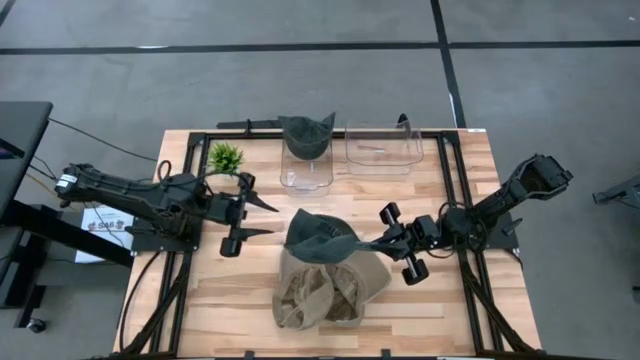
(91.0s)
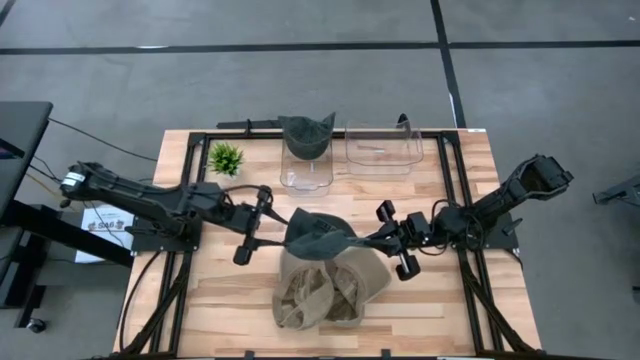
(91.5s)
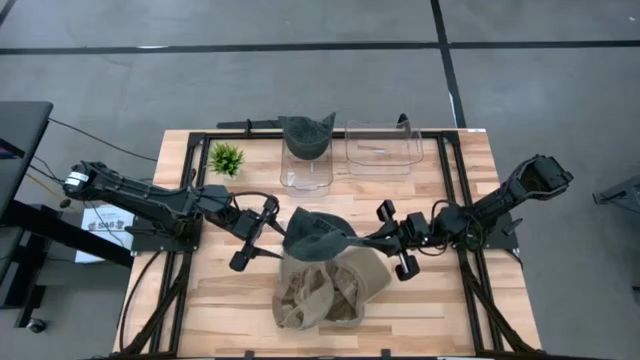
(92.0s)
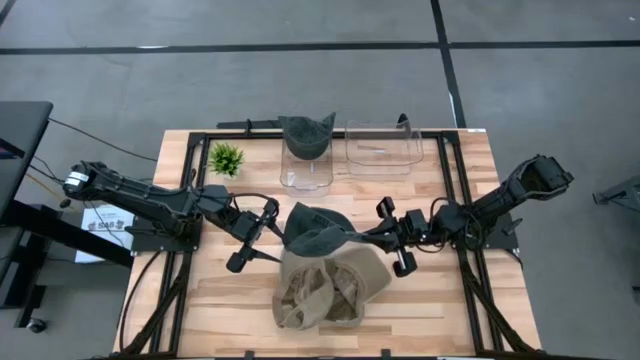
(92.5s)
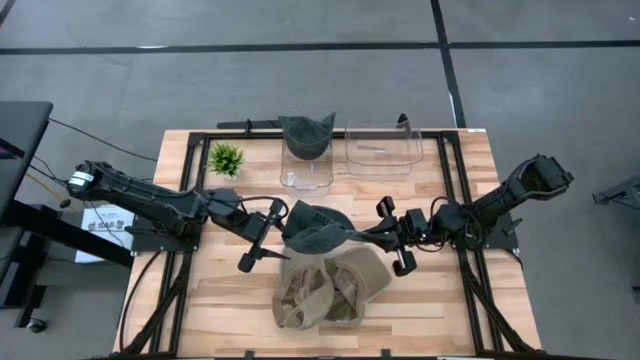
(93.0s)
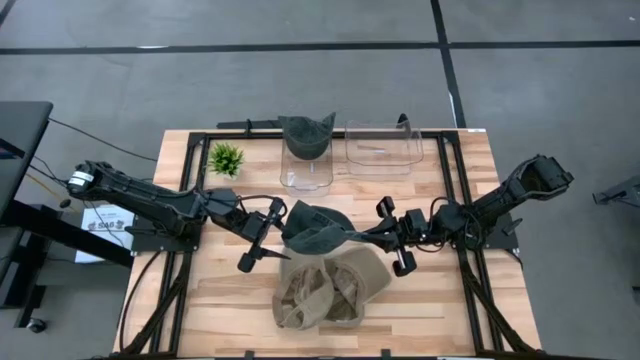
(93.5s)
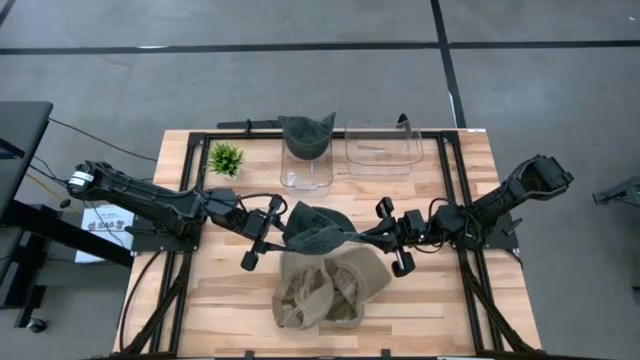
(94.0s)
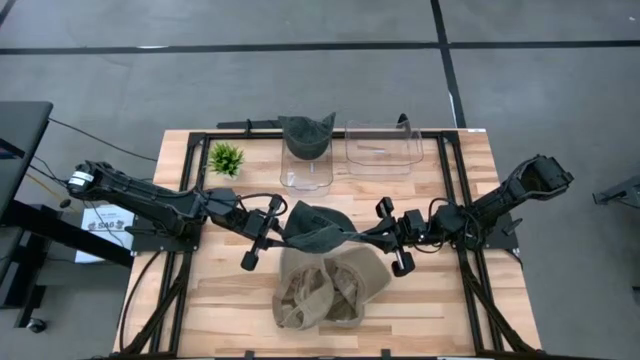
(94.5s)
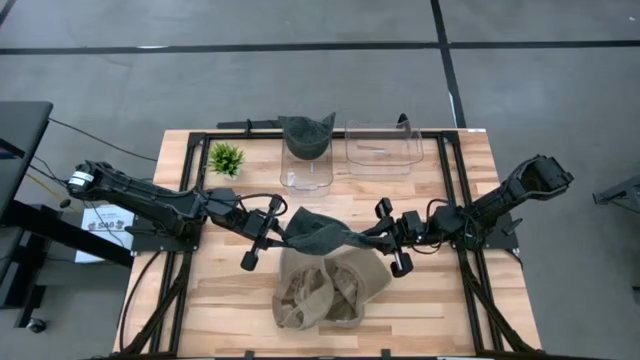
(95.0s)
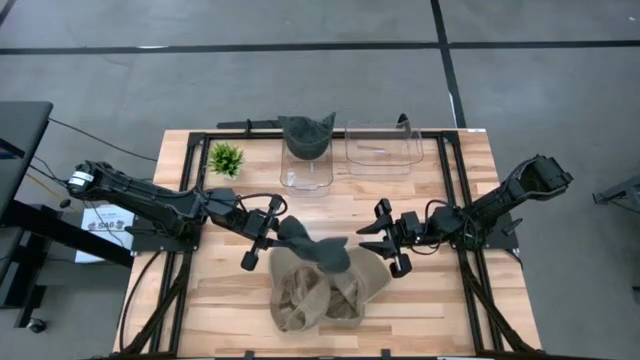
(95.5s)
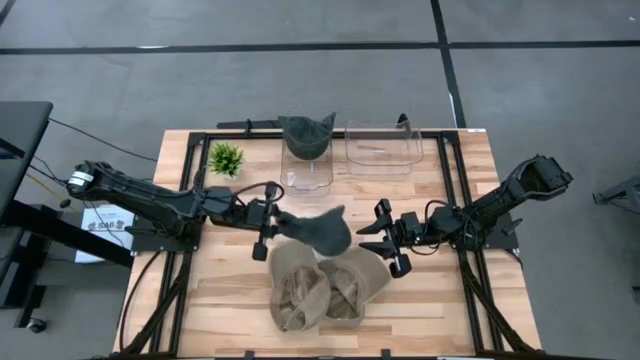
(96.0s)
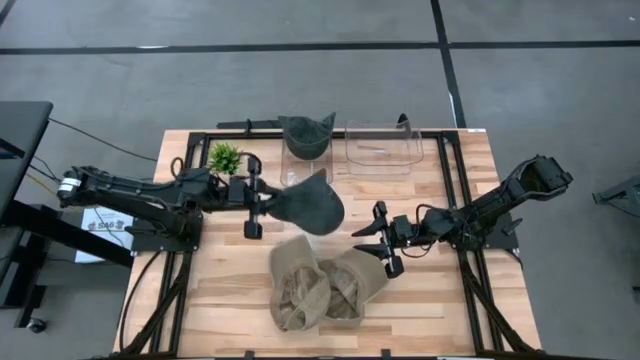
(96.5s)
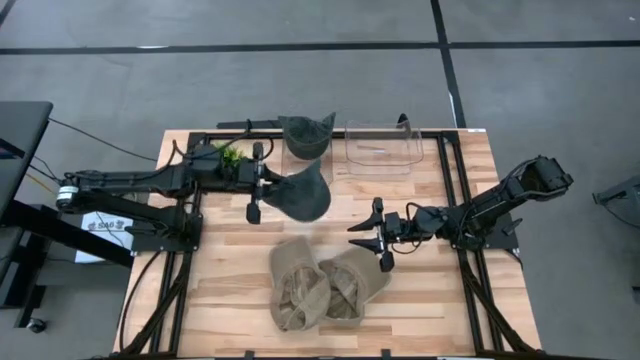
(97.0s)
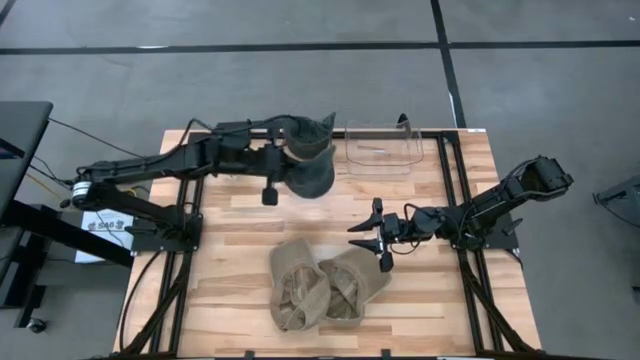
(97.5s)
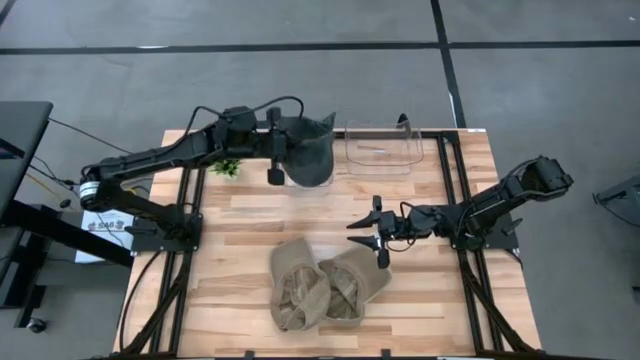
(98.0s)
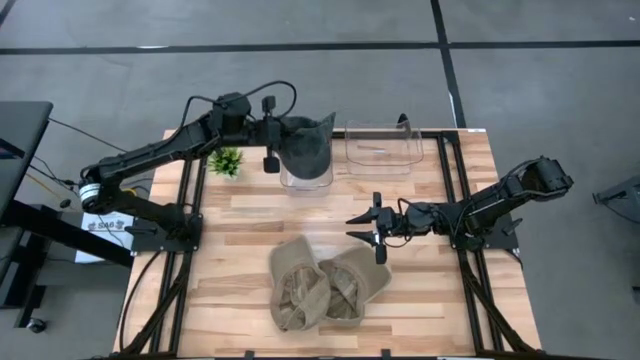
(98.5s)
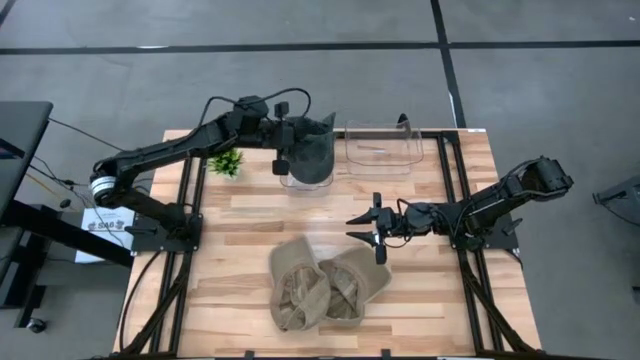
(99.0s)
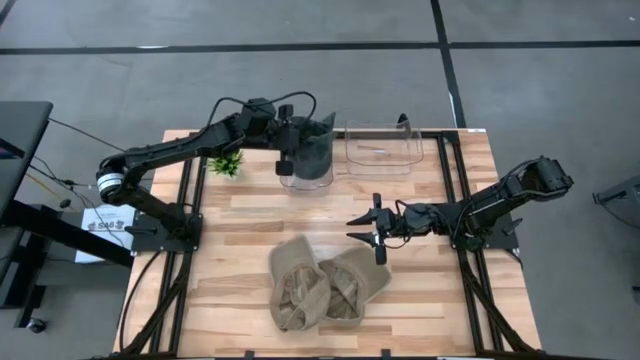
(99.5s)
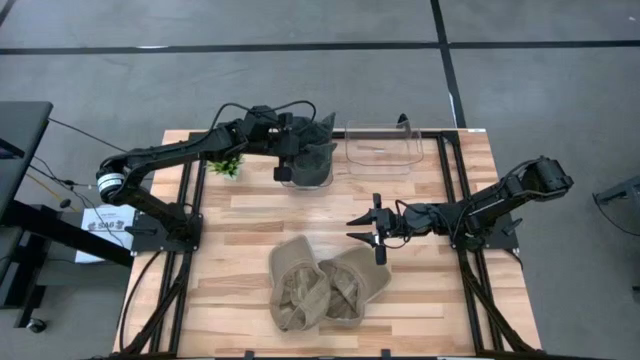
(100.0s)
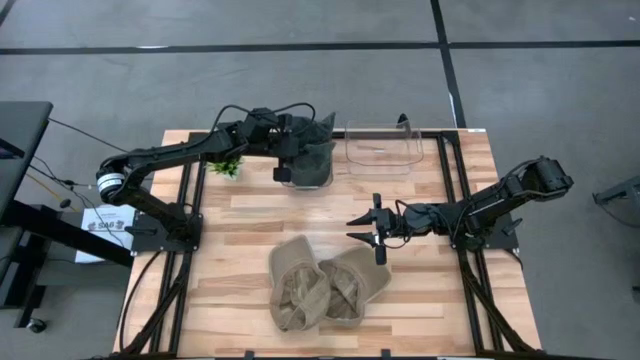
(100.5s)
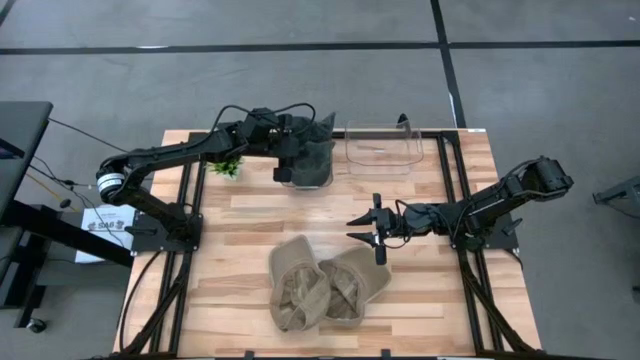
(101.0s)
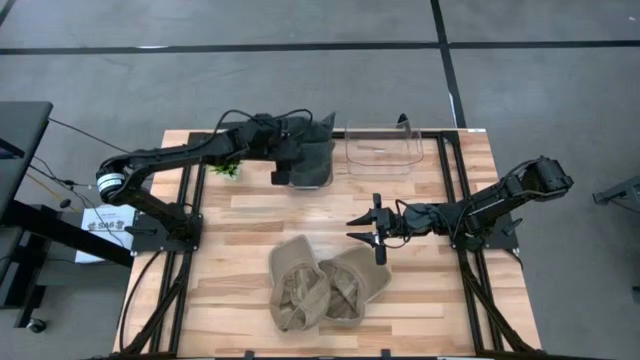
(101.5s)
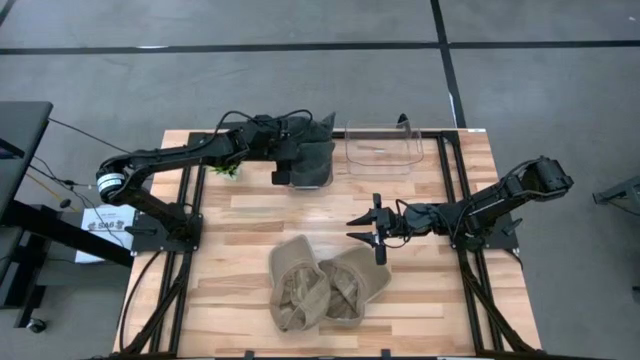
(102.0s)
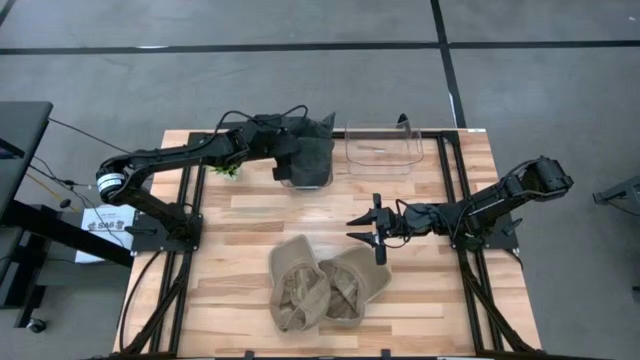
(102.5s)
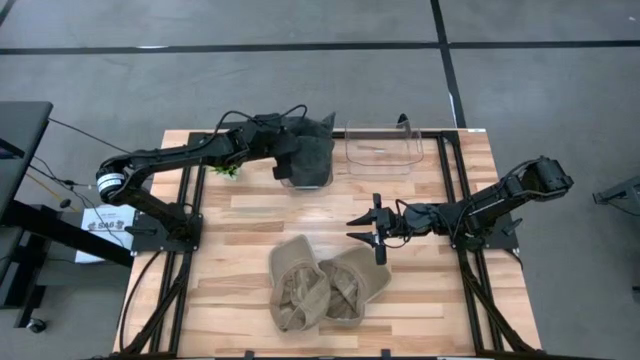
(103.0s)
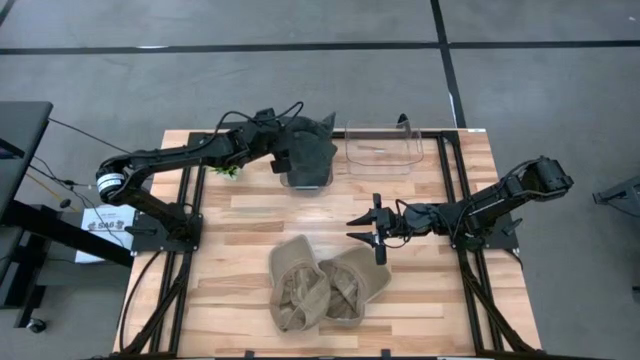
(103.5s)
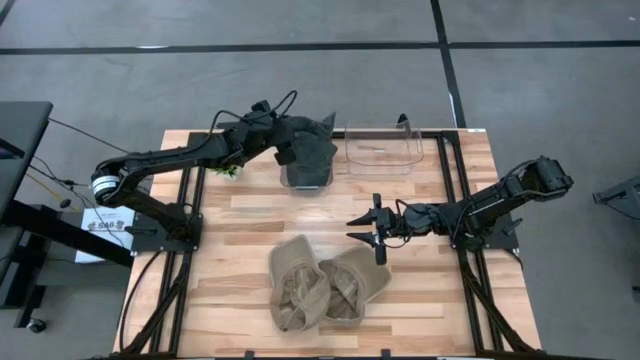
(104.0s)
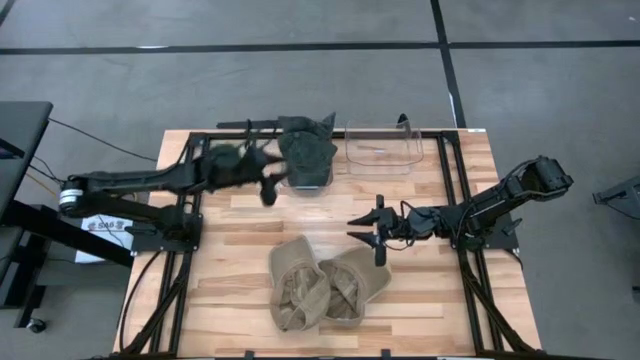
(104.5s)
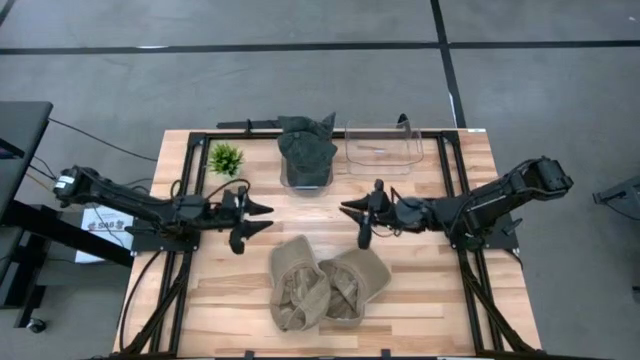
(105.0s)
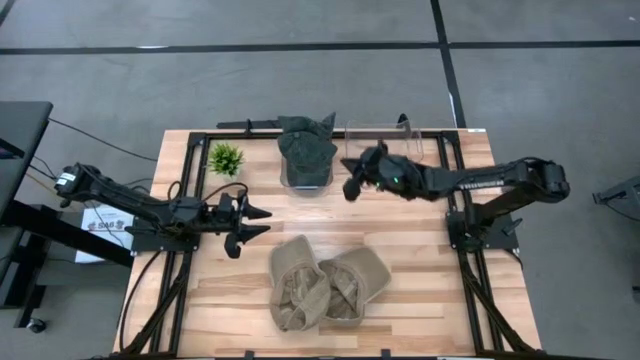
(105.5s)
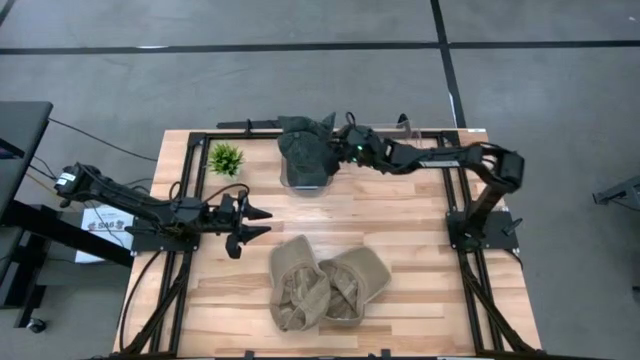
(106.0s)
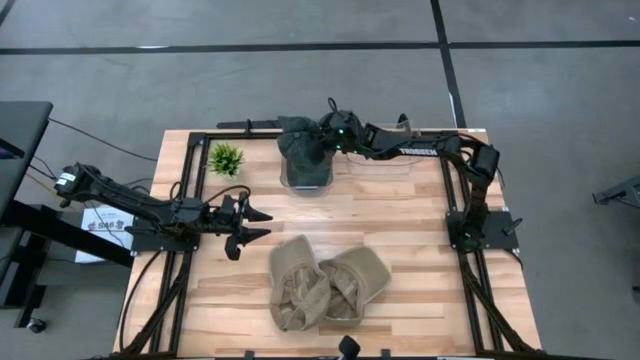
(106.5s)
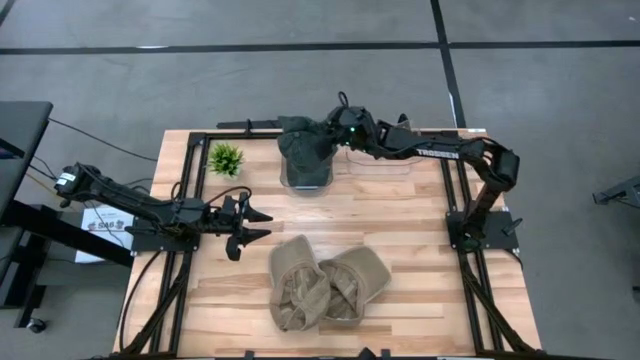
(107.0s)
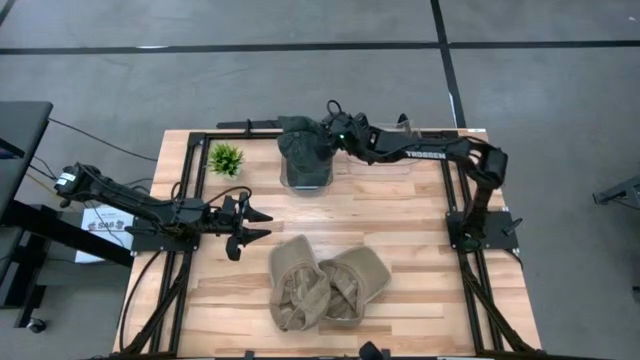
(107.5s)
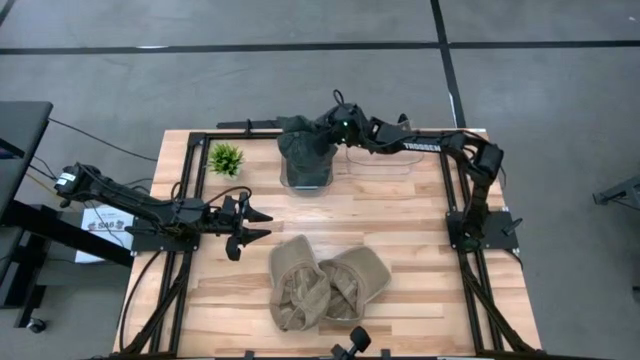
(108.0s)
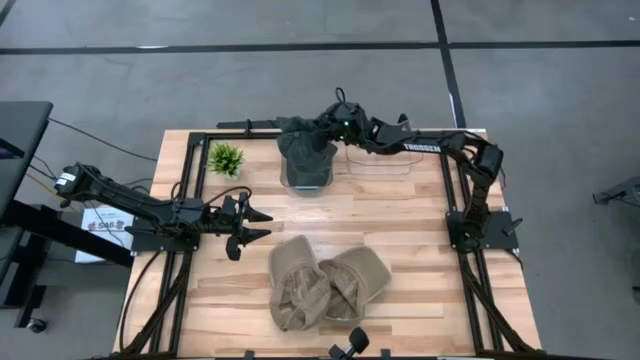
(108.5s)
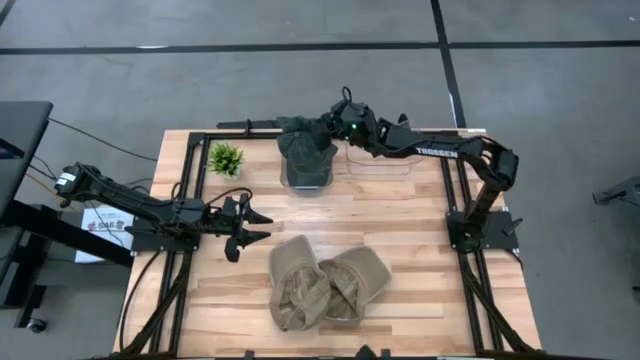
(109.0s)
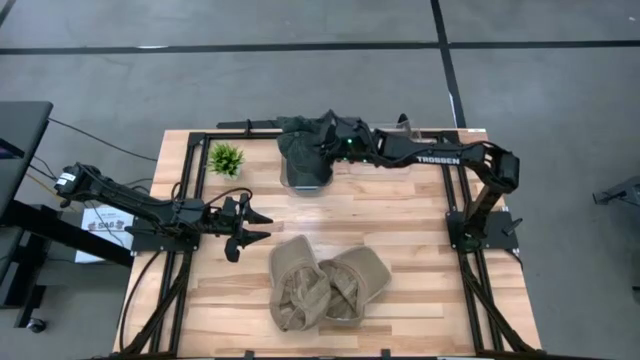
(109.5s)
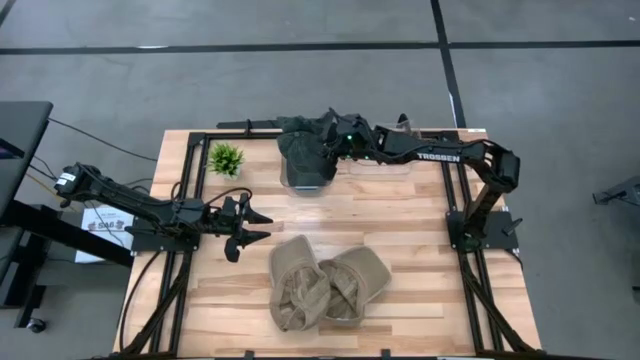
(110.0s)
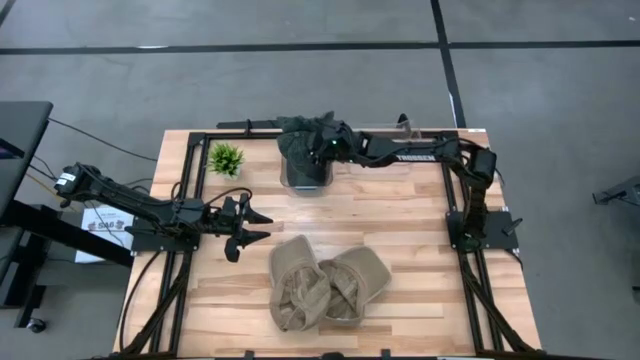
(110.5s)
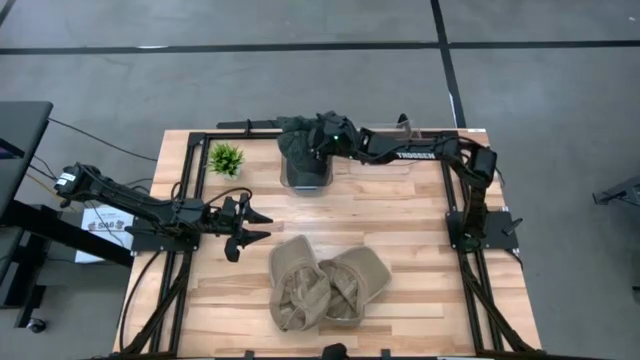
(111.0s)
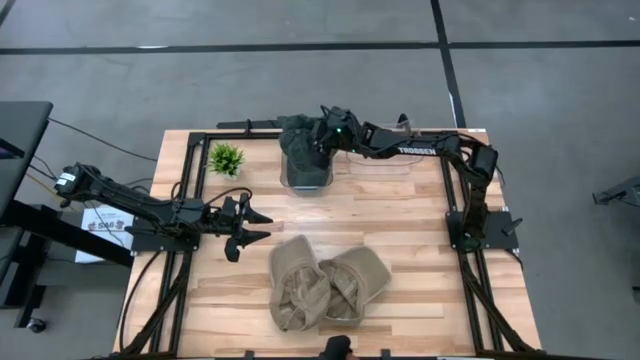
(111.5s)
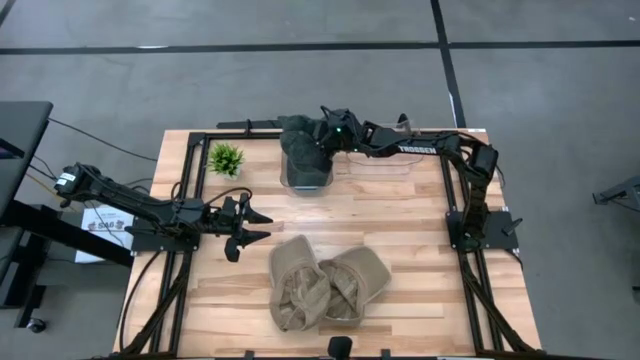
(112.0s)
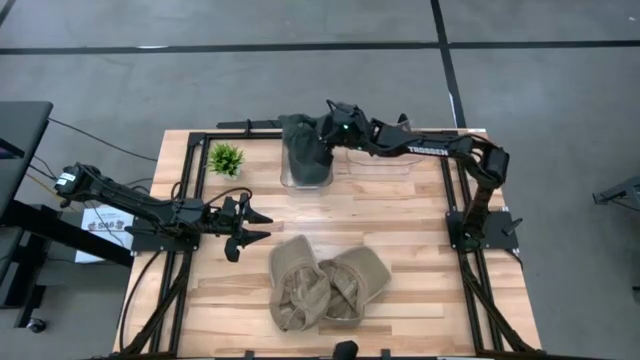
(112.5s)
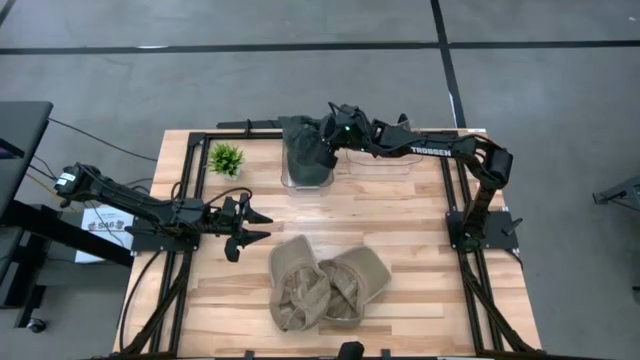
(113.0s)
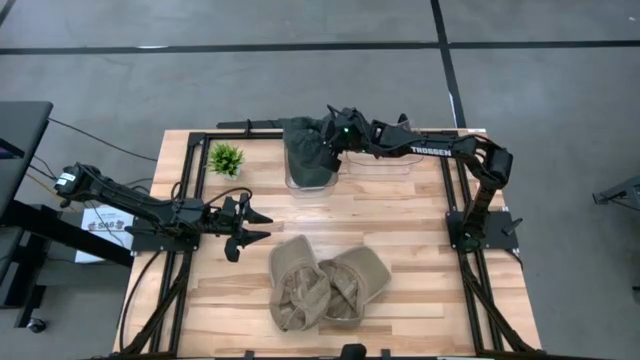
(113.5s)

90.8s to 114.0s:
Task: Pick & Place hat
Put the black cap into the left transparent bin
